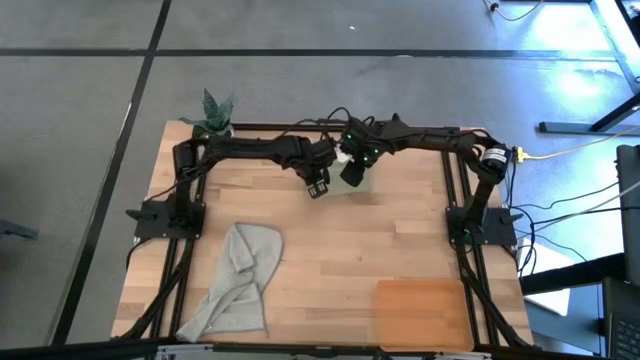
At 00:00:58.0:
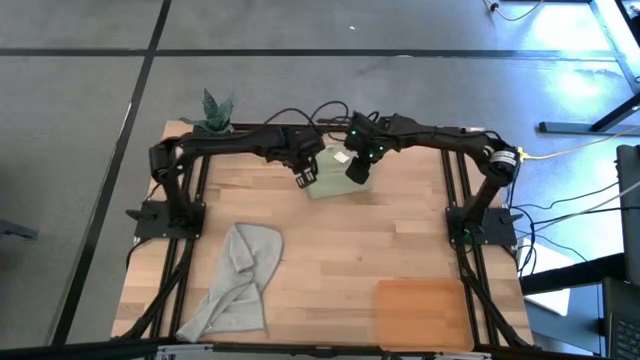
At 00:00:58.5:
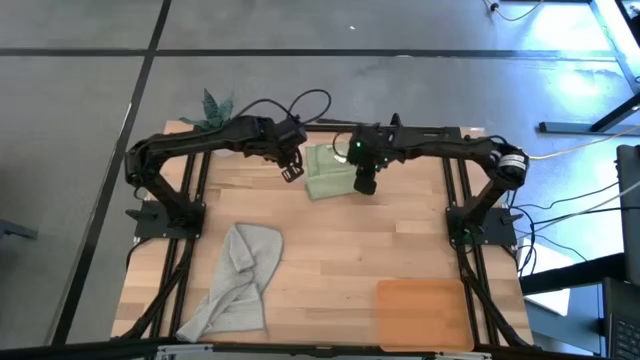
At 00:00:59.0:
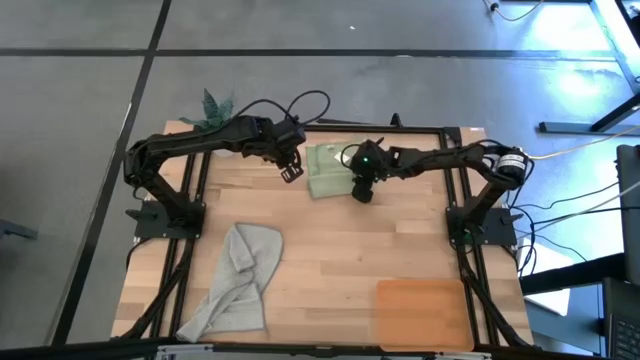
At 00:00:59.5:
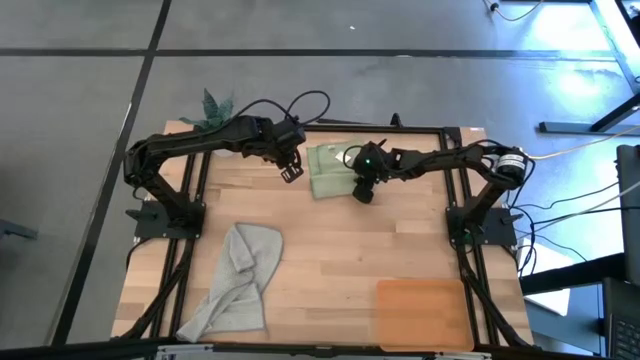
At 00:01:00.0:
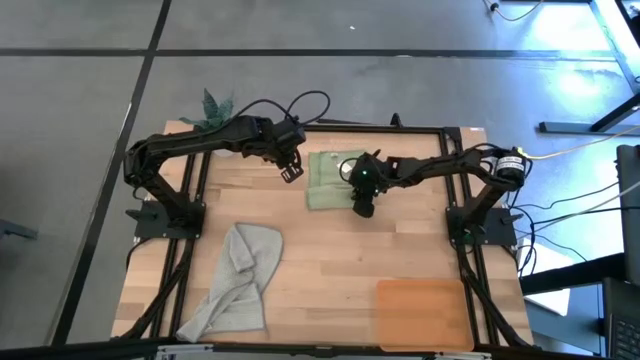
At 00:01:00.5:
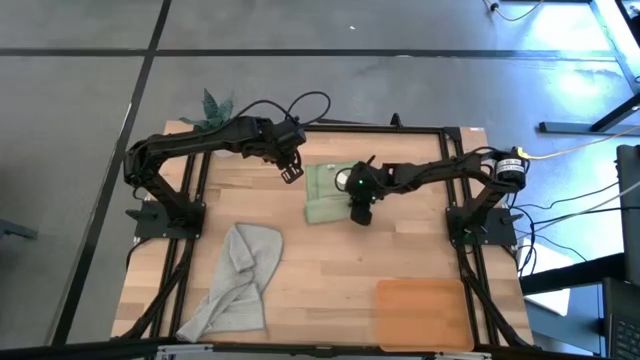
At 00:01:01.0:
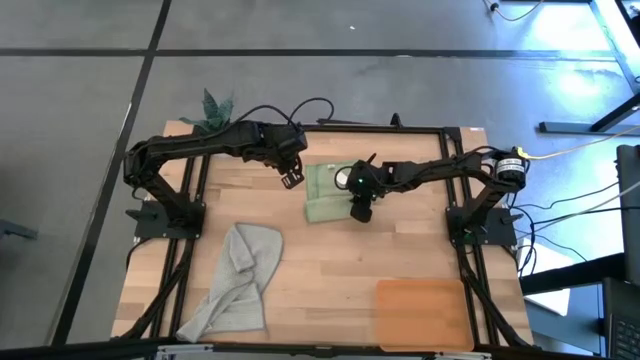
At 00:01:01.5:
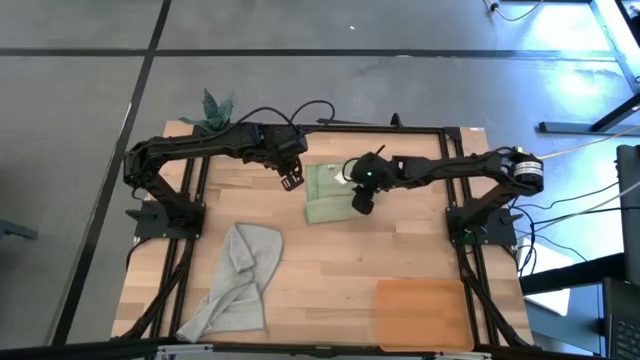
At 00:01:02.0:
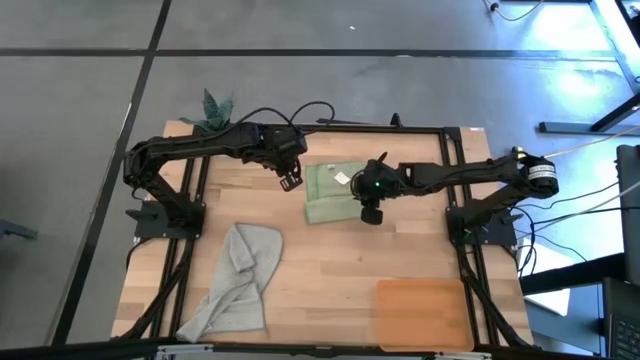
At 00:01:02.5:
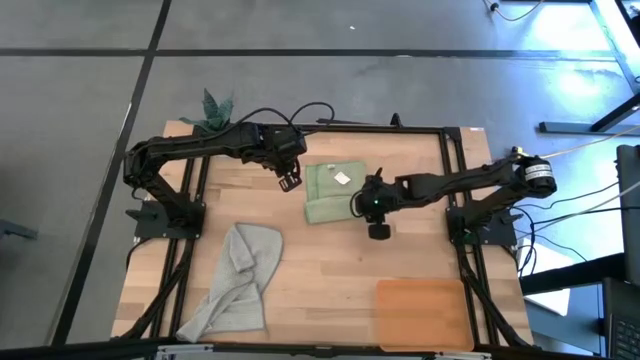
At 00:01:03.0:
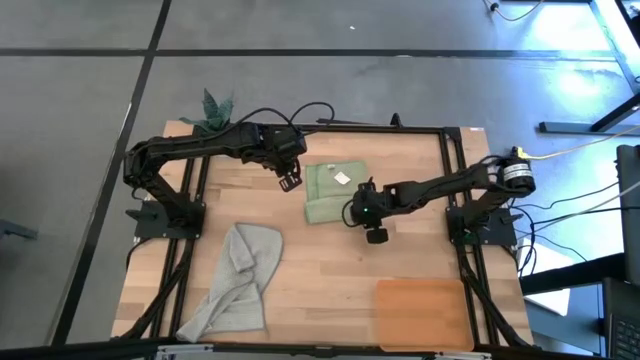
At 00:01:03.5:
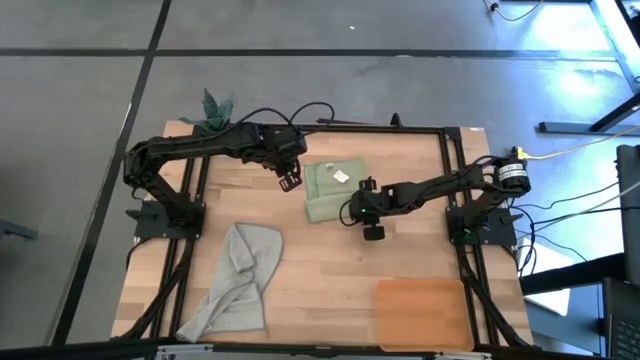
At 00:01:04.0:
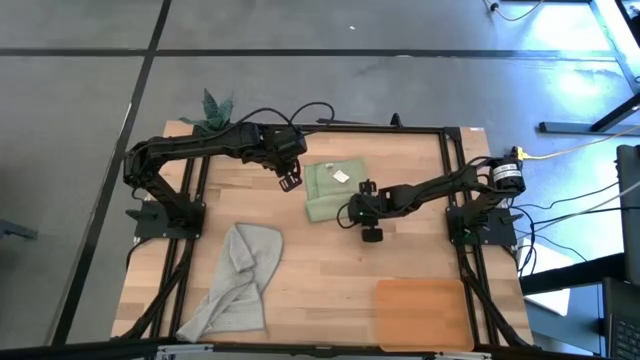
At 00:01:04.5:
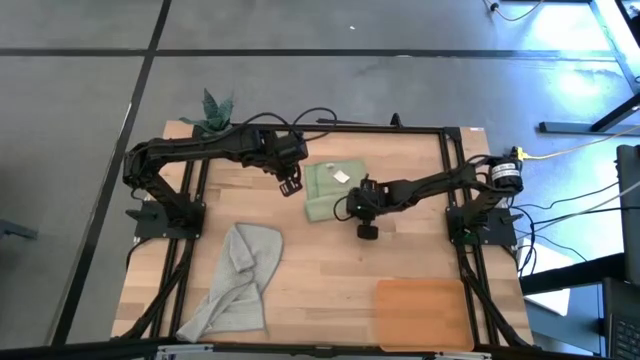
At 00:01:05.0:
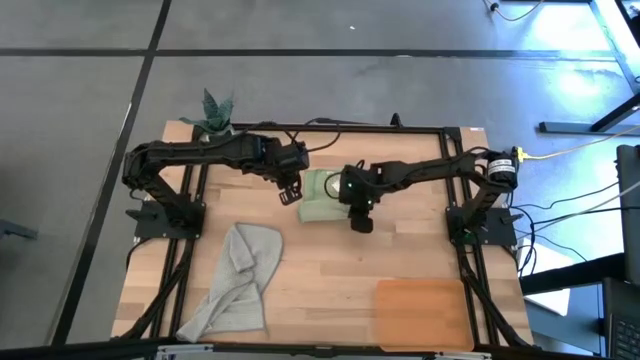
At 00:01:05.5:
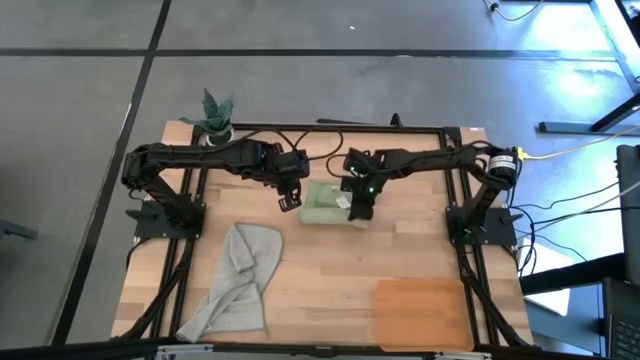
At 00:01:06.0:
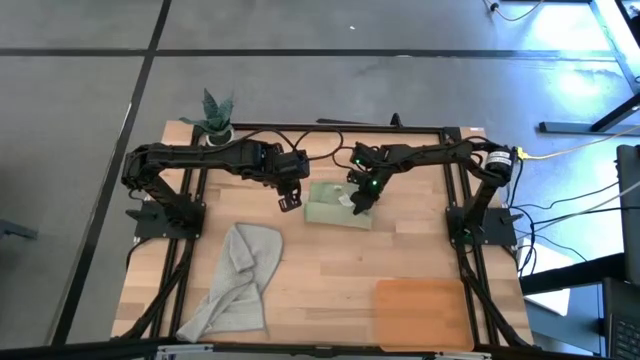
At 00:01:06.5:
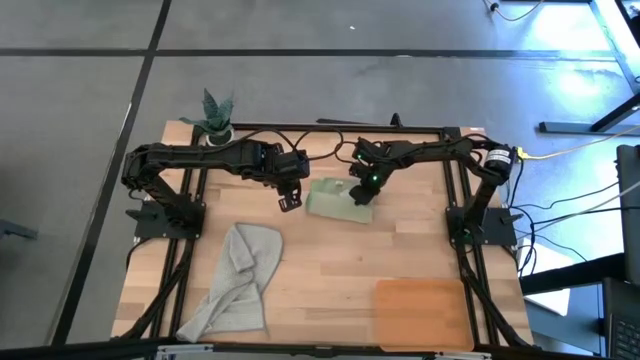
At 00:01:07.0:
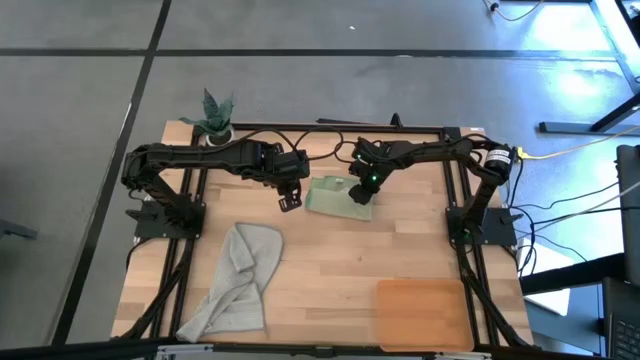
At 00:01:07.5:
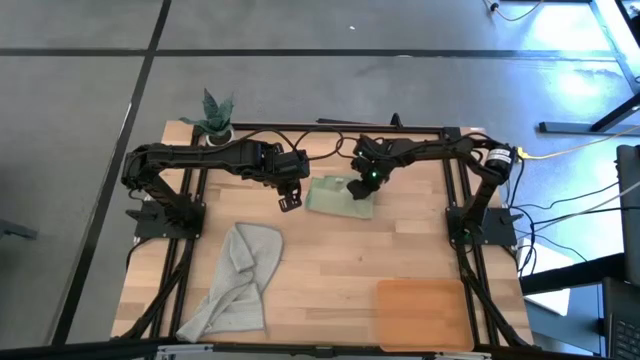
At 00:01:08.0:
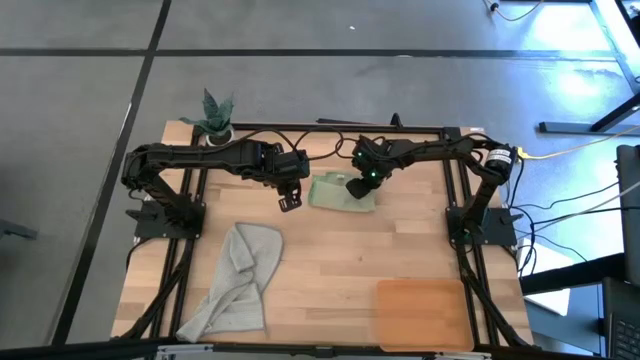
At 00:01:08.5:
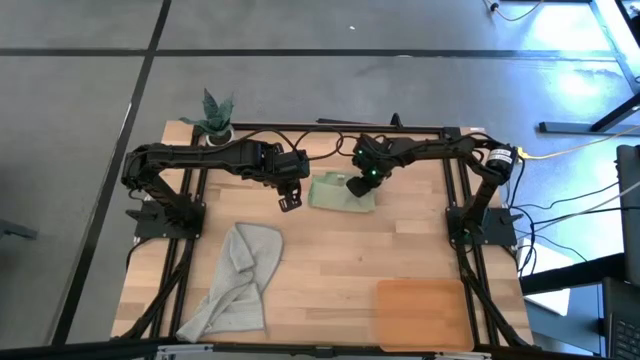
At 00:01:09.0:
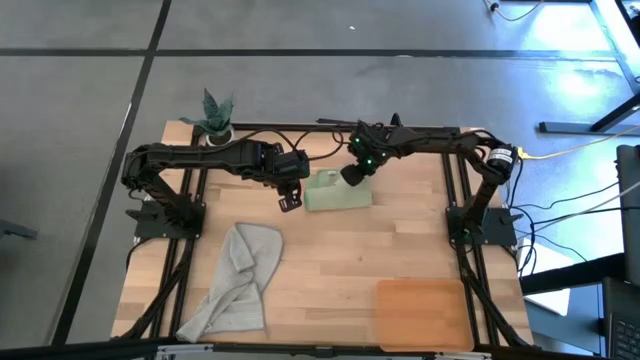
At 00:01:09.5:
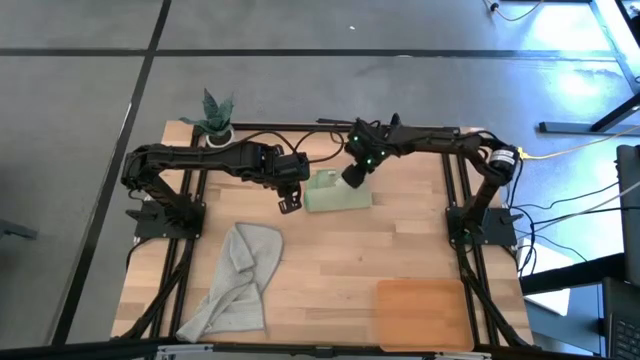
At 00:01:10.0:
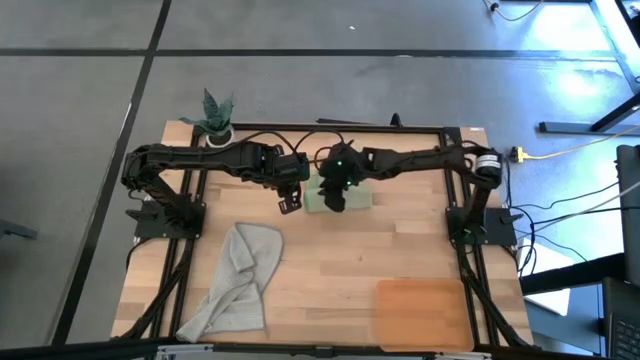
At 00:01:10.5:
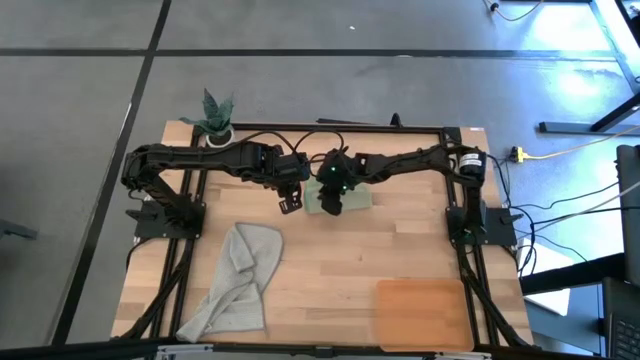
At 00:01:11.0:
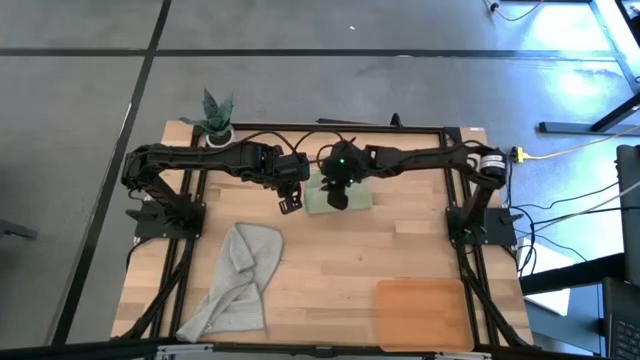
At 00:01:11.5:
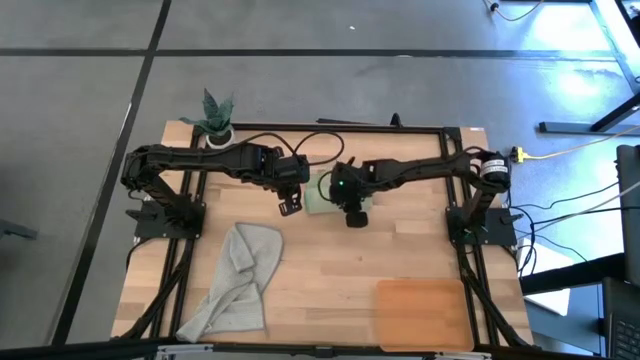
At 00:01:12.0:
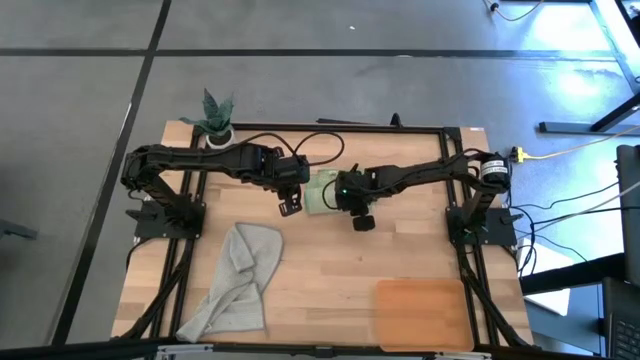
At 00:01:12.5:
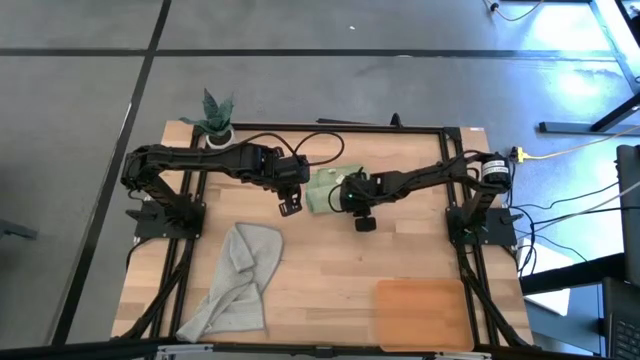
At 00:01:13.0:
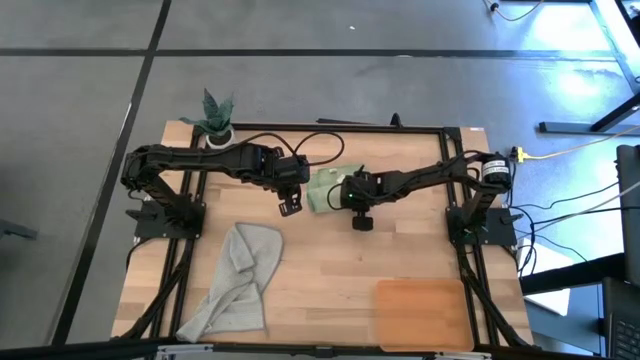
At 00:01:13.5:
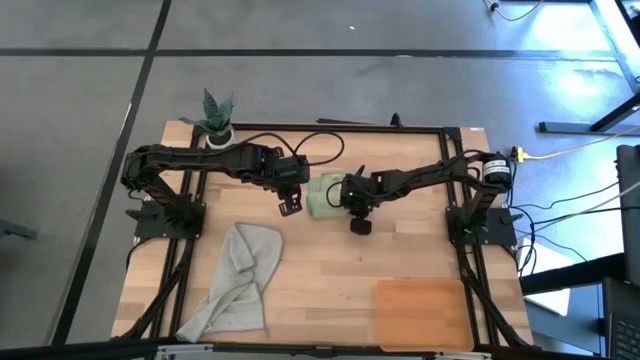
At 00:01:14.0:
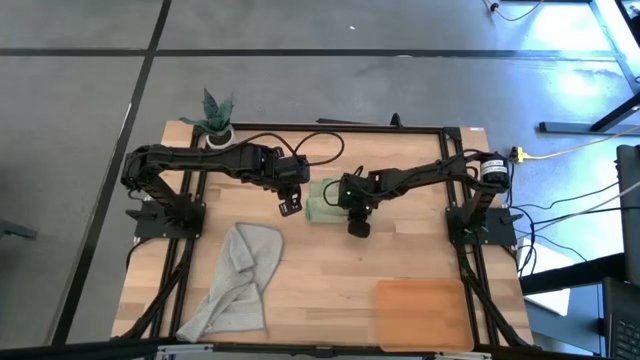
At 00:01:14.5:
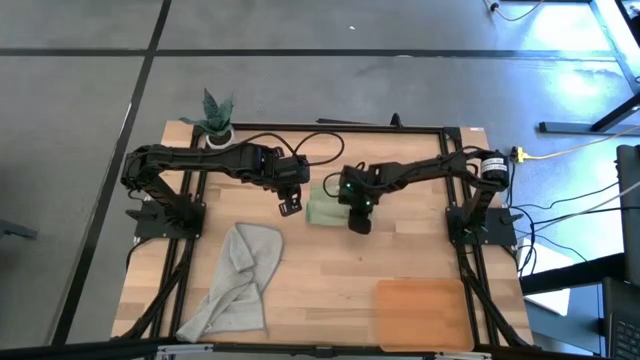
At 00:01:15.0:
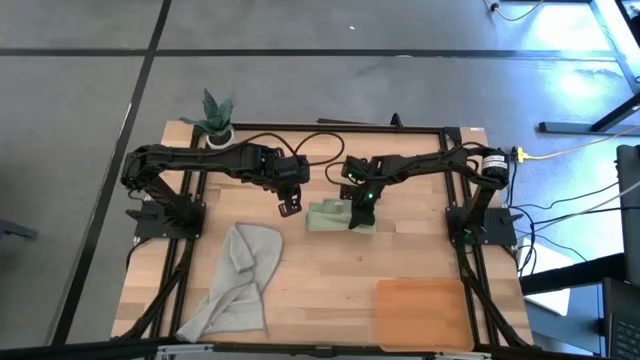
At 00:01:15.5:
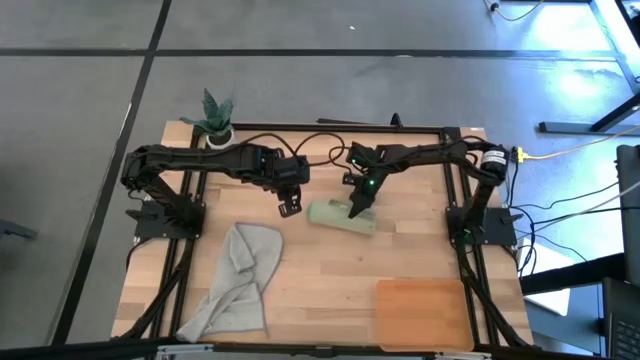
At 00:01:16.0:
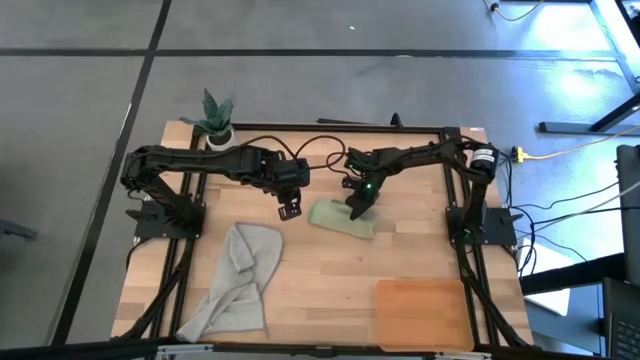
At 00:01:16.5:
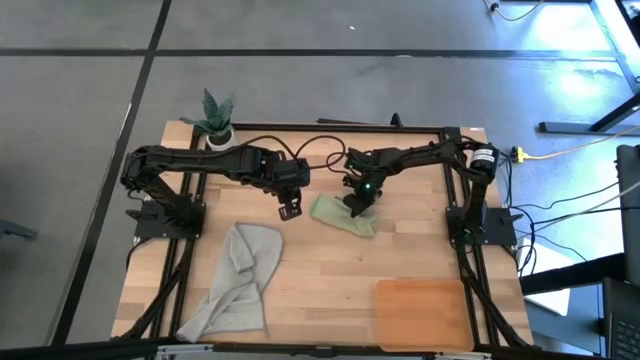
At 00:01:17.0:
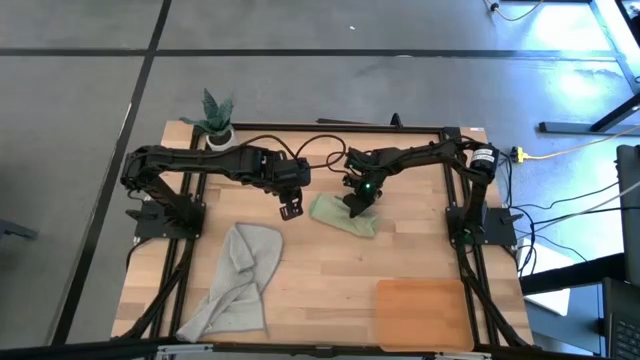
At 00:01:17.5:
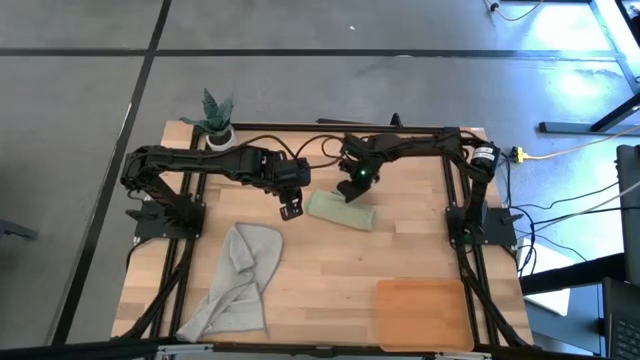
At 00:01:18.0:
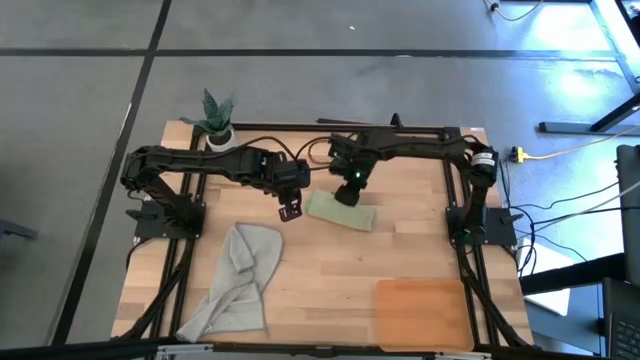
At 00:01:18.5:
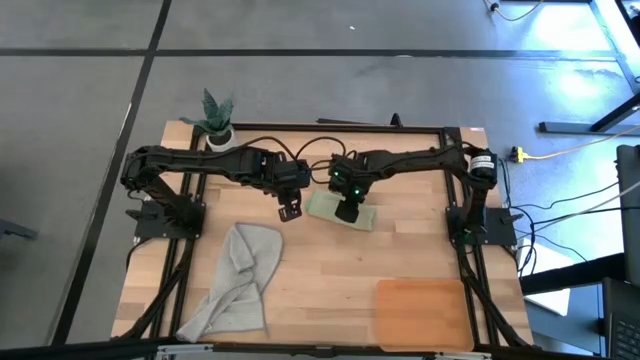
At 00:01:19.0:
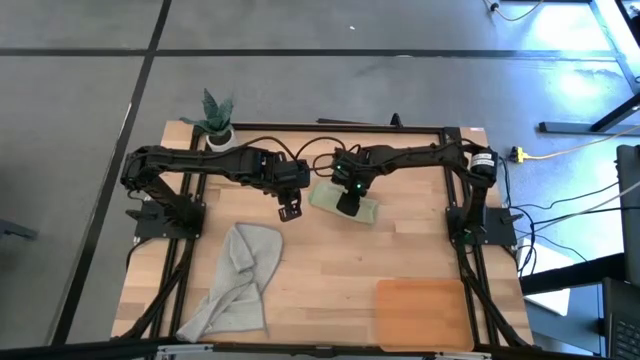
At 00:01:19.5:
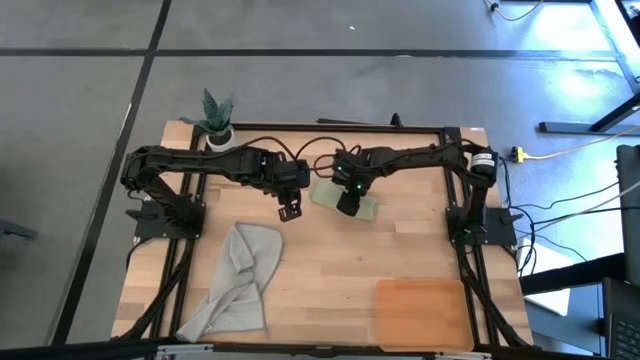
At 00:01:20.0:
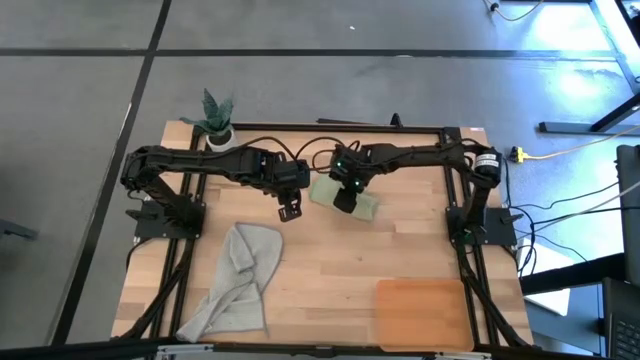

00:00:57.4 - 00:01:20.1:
Task: Roll microfiber towels into tight, uniform cylinder then place into a basket
Roll the green microfiber cloth
